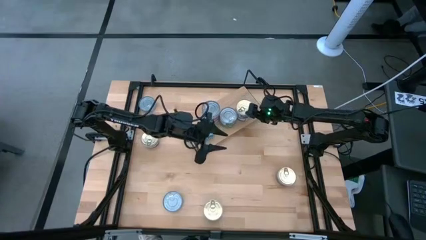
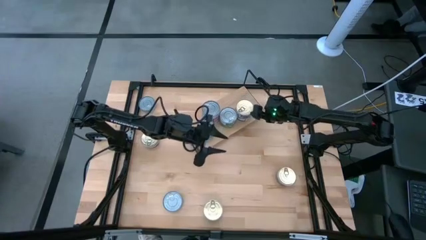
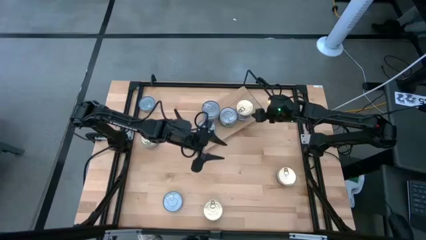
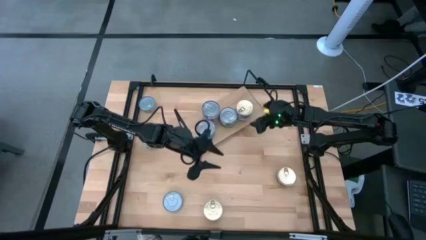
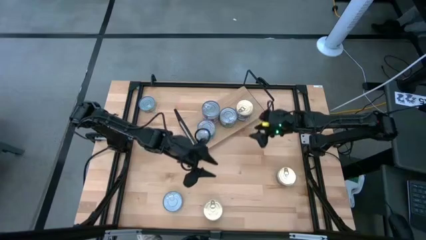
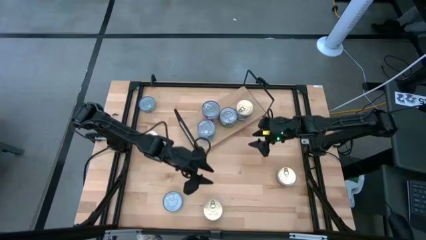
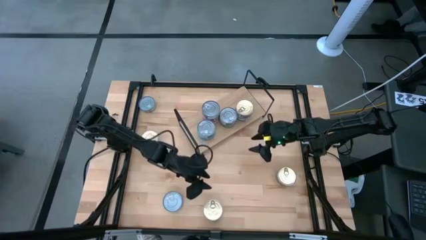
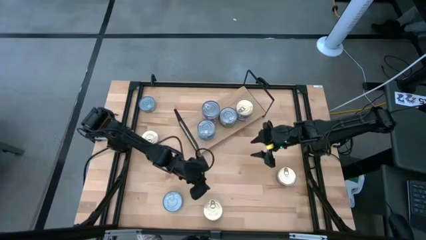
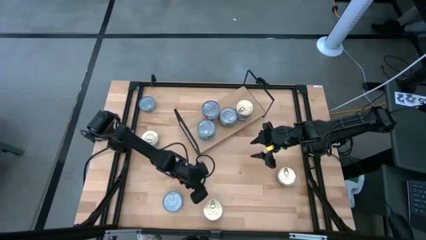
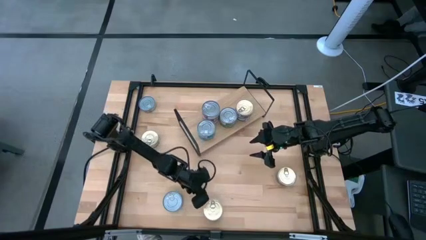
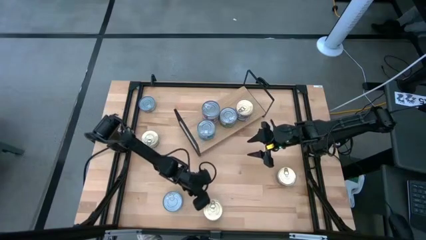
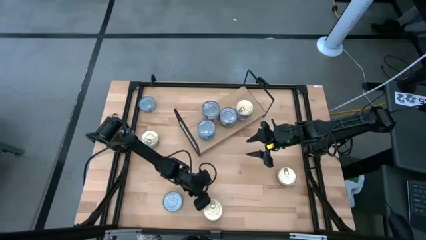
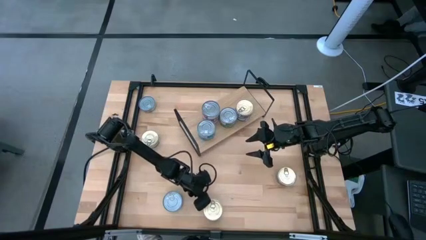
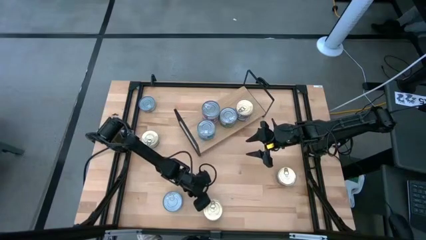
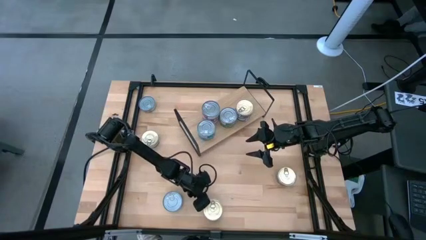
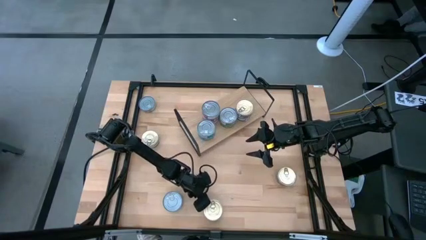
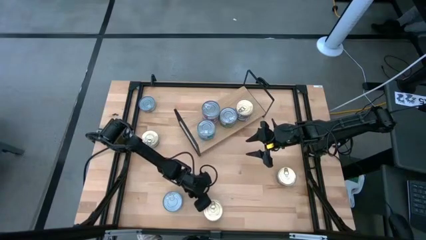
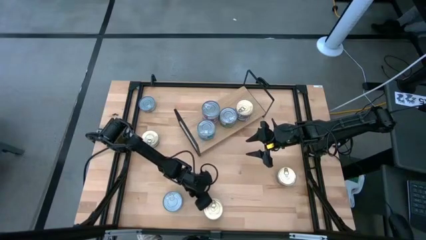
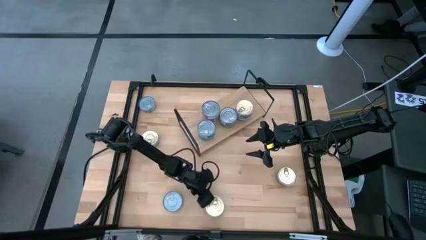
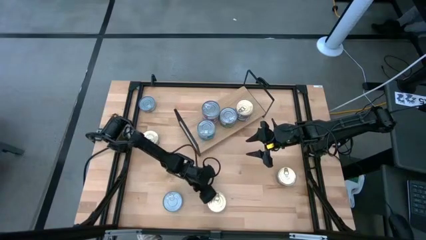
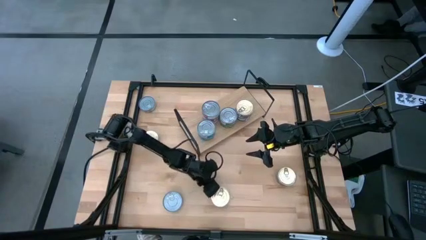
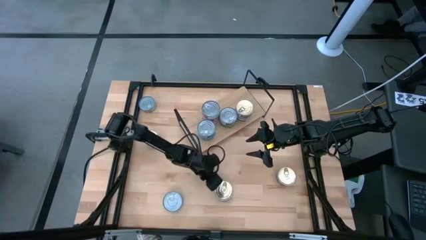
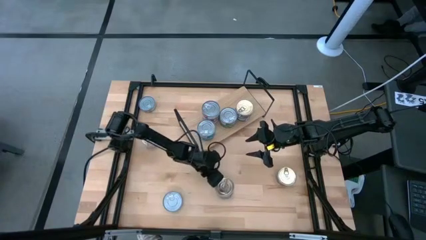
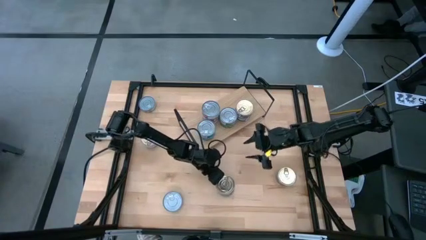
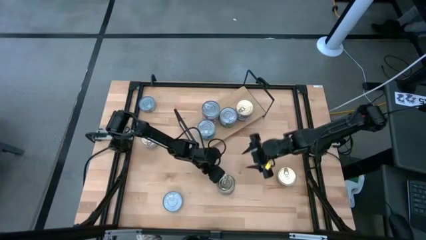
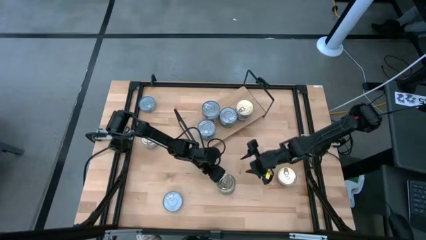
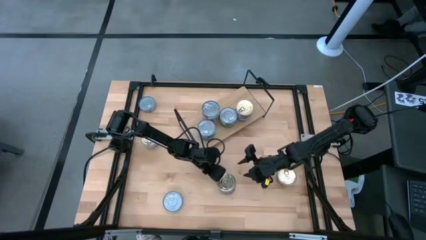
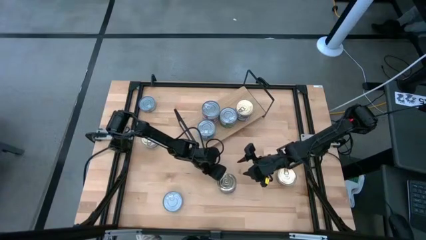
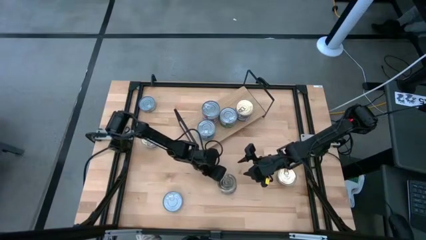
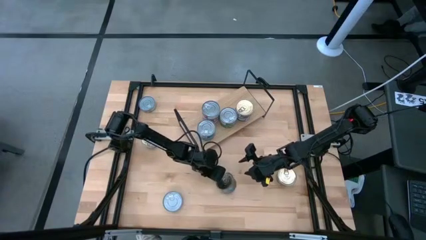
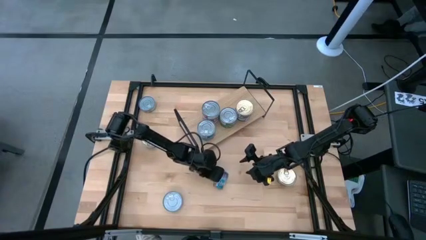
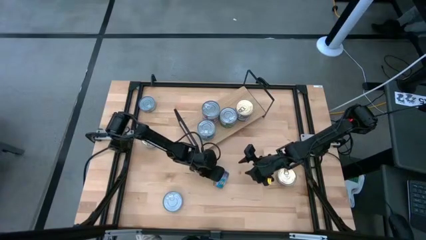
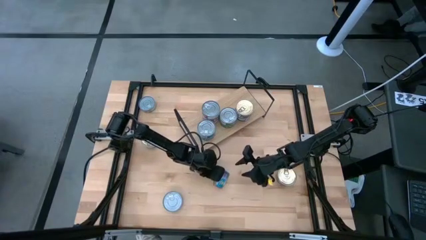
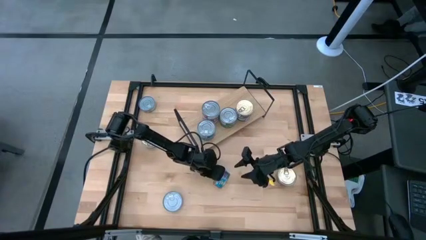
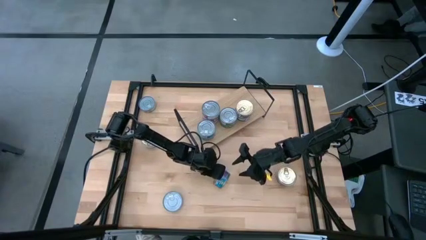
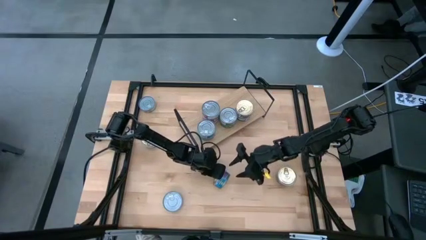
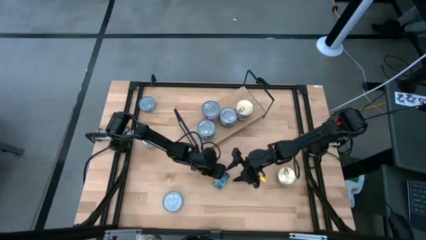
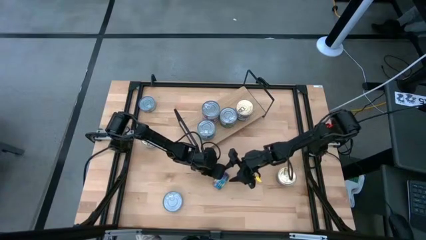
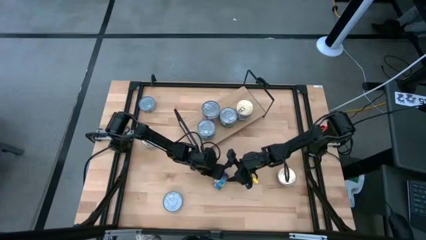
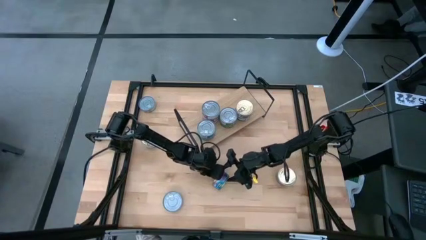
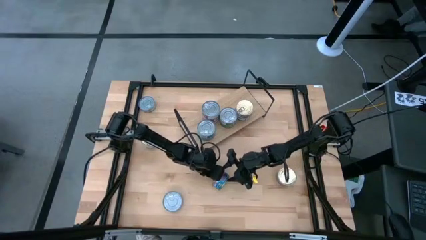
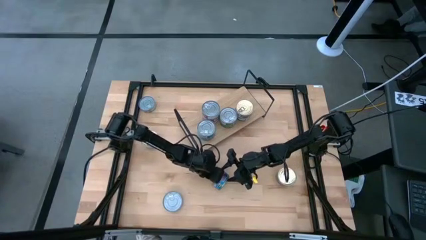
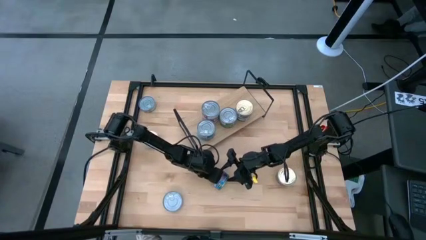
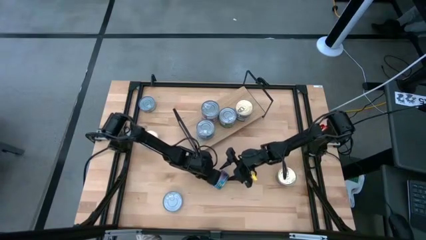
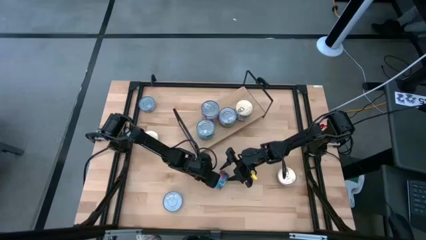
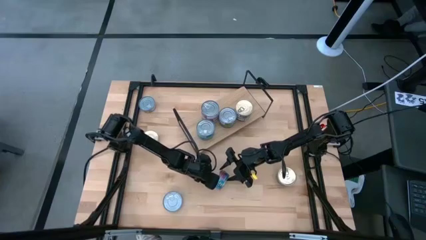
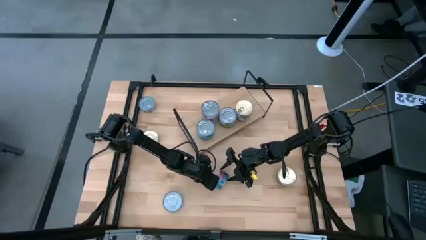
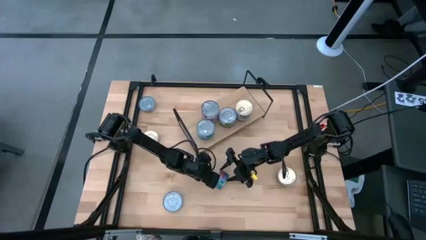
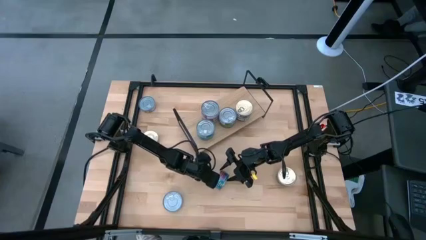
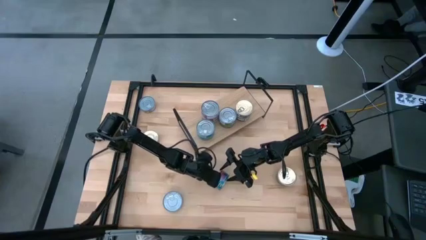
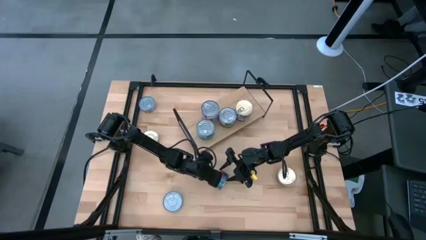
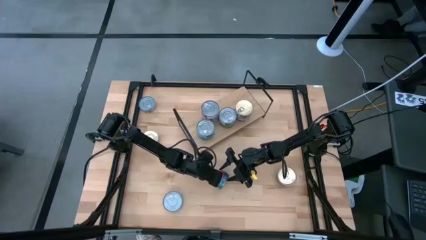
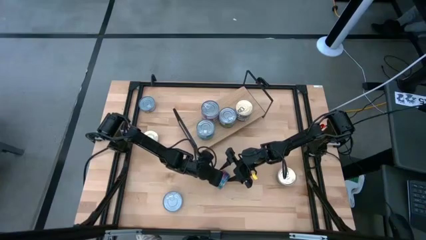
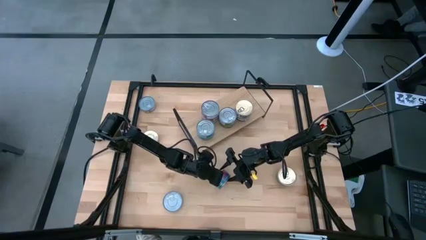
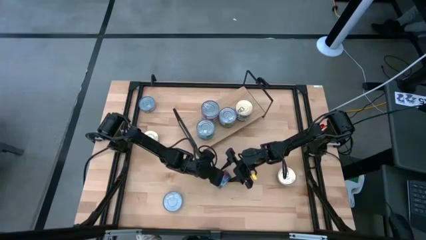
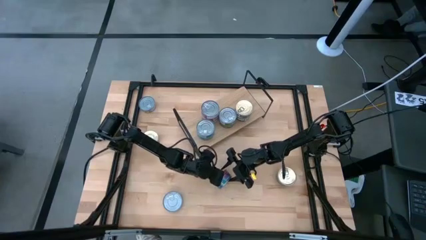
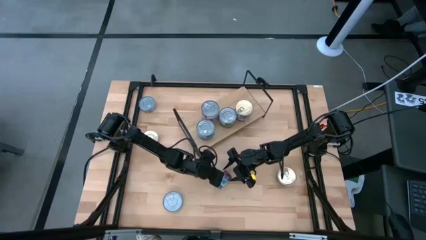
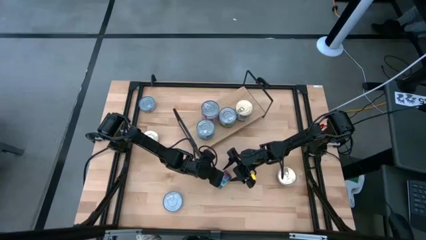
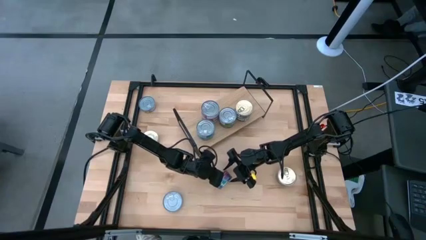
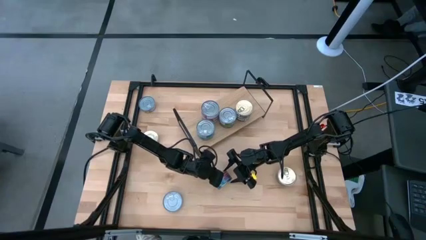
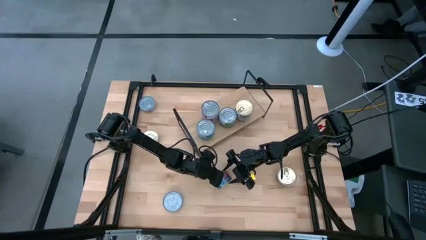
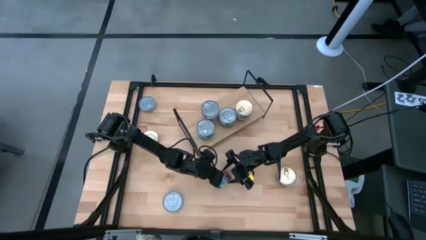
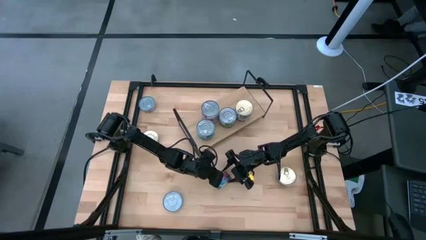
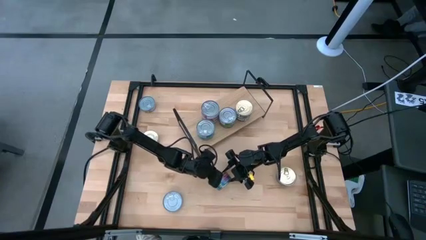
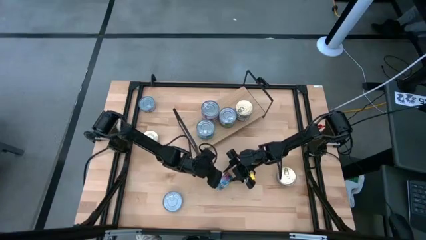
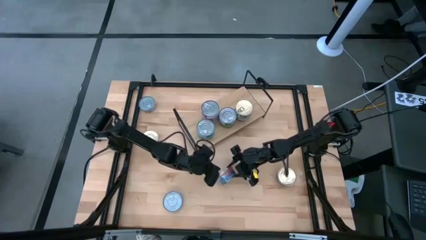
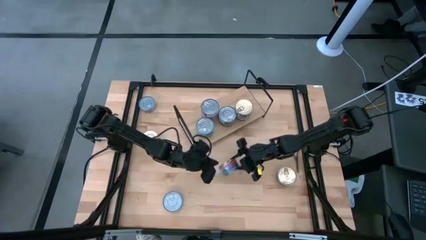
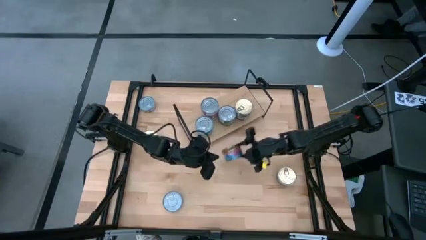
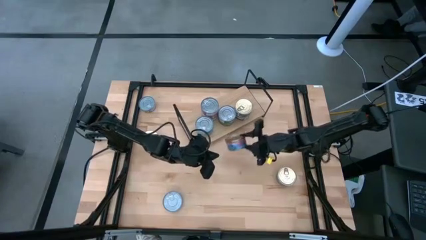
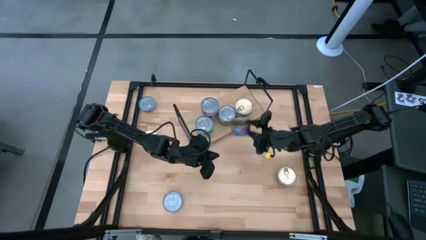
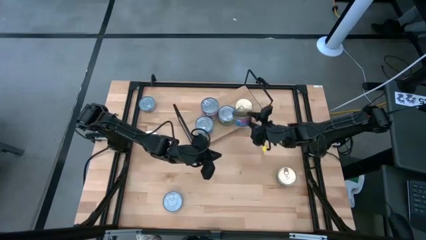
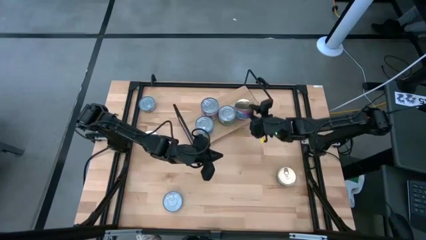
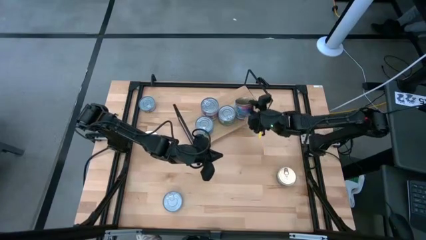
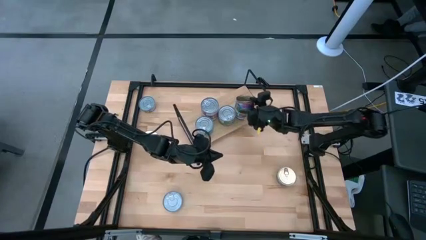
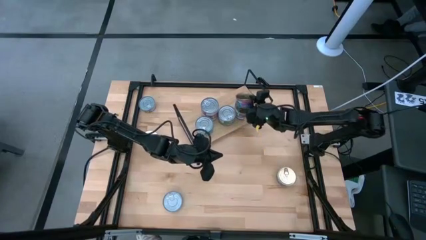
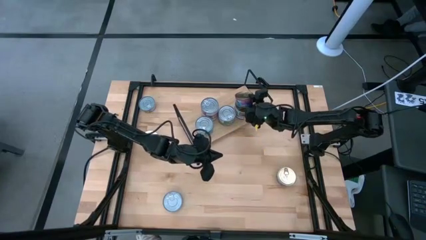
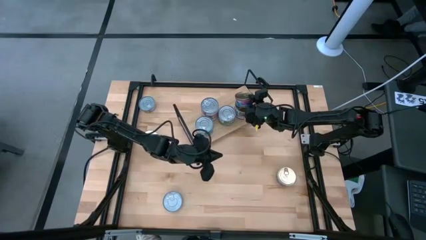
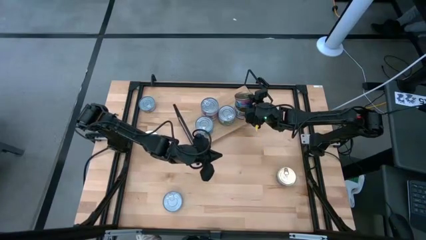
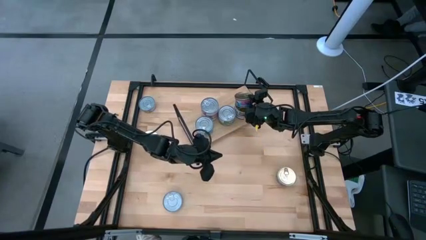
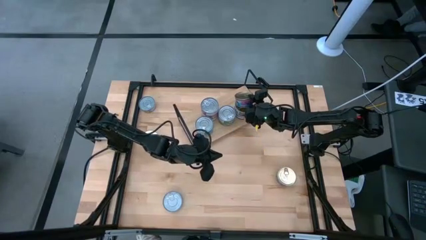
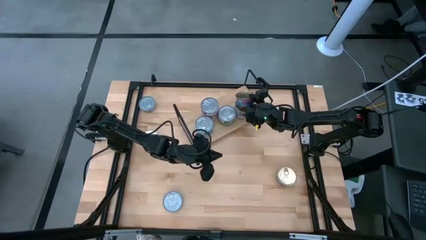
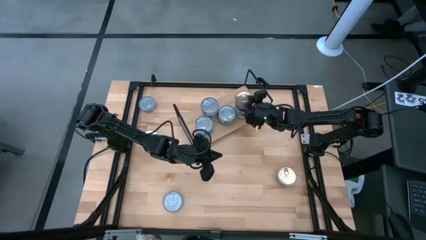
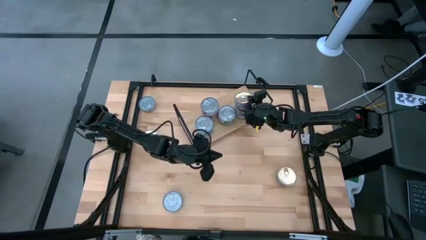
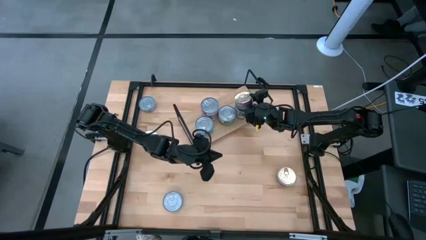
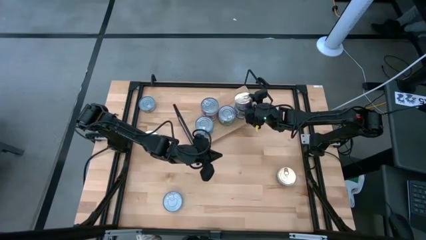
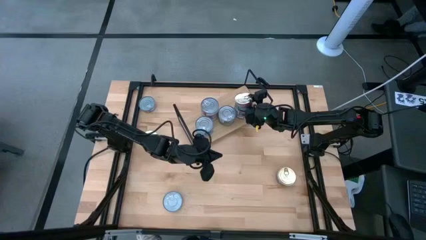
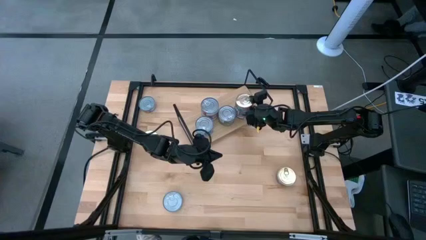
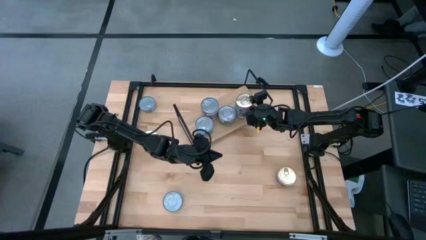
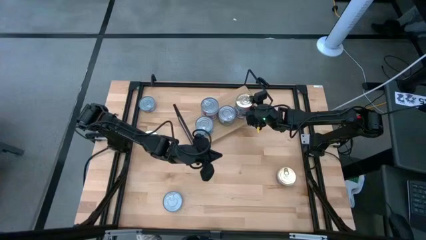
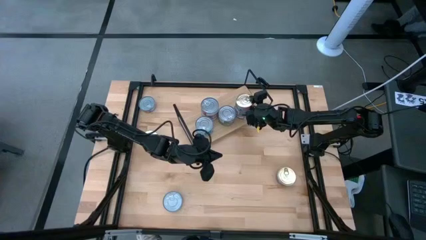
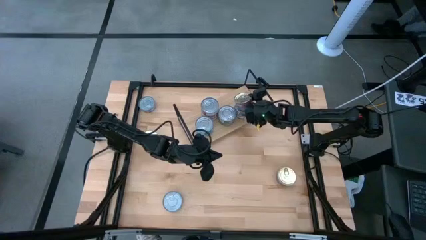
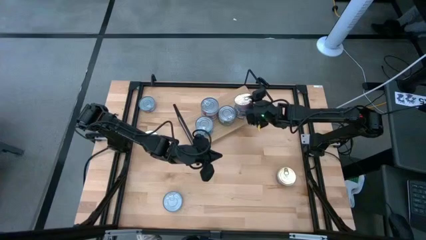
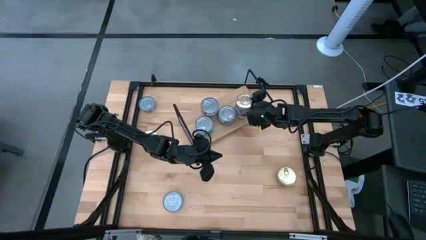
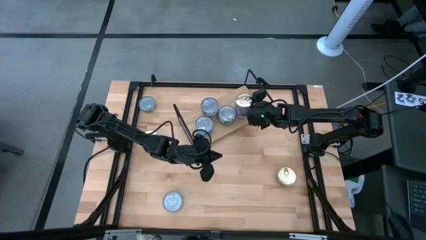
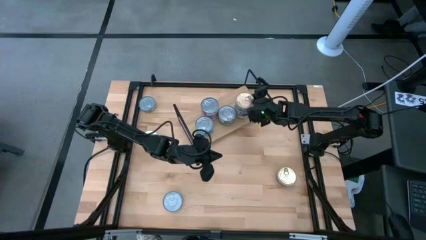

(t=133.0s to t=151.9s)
Task: Stack canned seafood by type on shelf
Stack the blue and pink tuna can on the shelf on top of the other blue and pink tuna can
